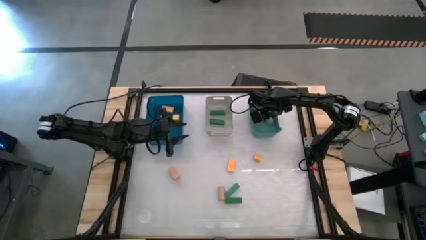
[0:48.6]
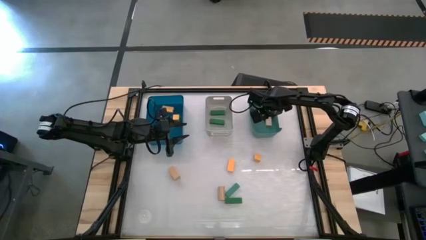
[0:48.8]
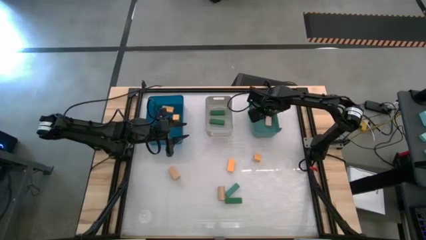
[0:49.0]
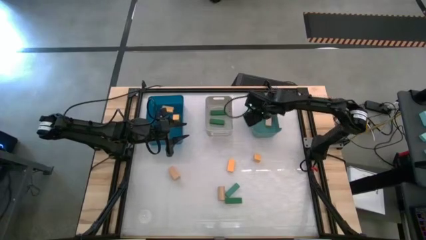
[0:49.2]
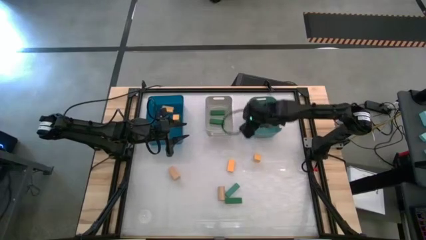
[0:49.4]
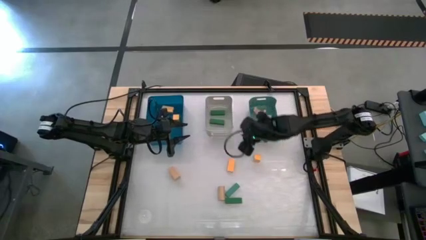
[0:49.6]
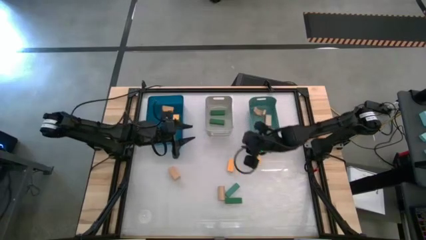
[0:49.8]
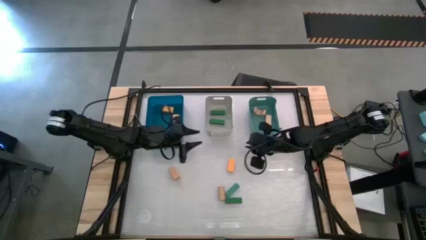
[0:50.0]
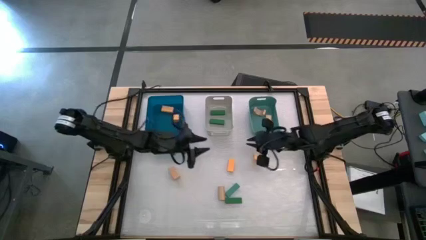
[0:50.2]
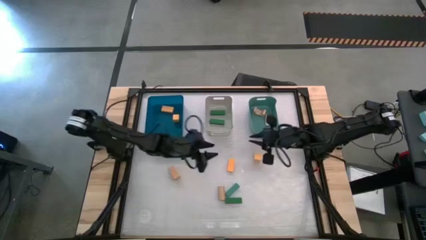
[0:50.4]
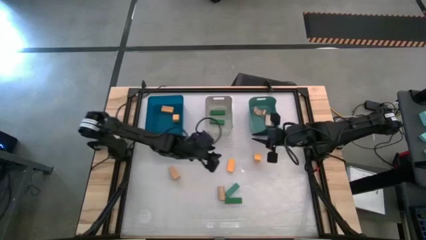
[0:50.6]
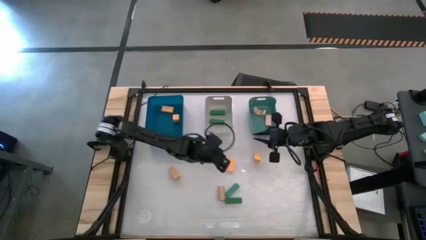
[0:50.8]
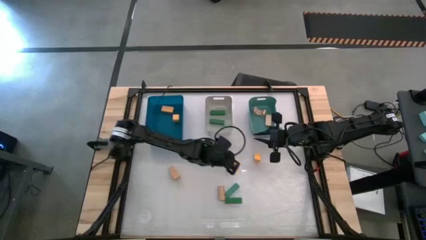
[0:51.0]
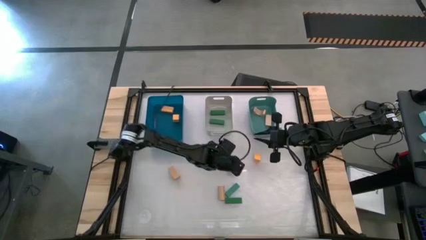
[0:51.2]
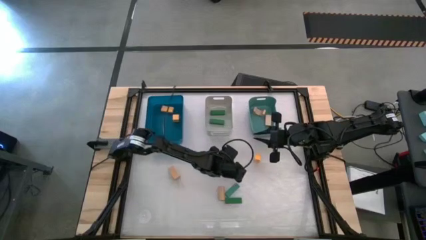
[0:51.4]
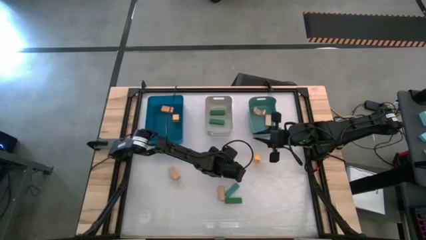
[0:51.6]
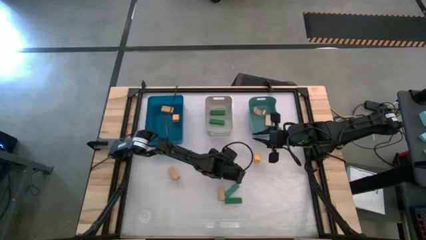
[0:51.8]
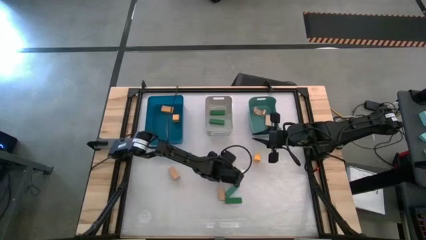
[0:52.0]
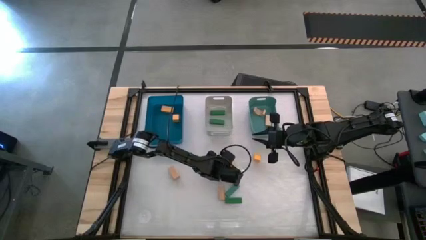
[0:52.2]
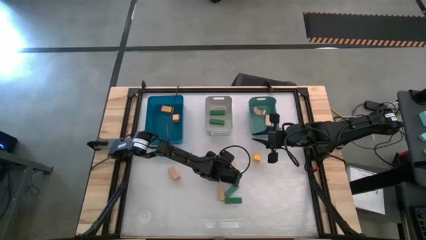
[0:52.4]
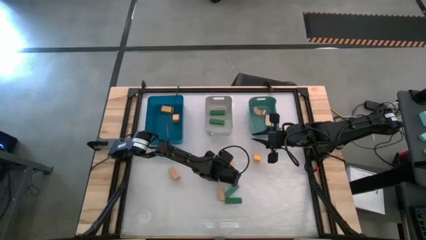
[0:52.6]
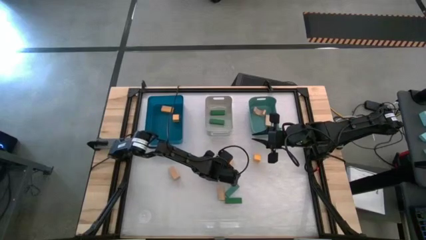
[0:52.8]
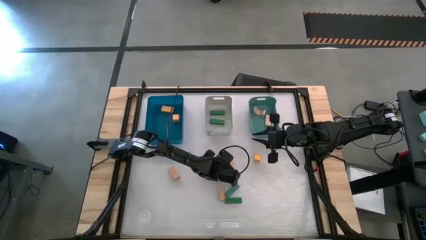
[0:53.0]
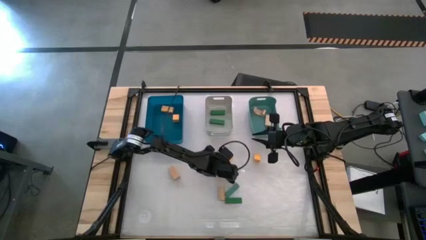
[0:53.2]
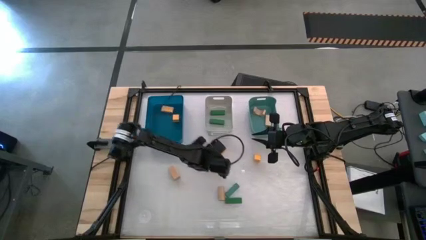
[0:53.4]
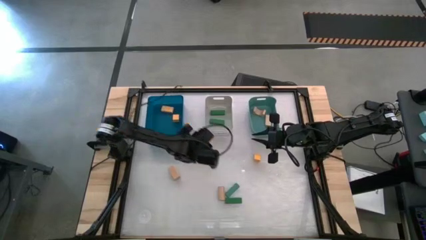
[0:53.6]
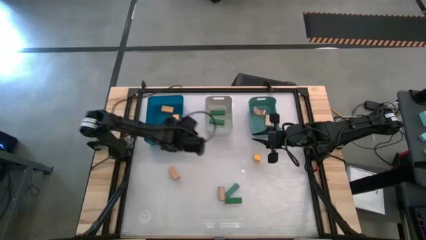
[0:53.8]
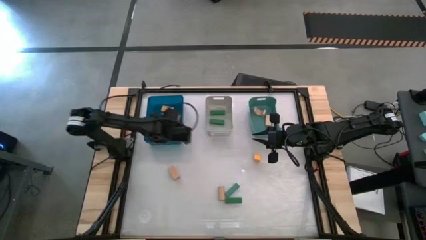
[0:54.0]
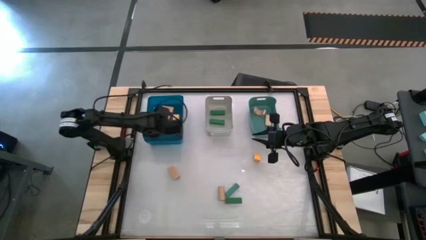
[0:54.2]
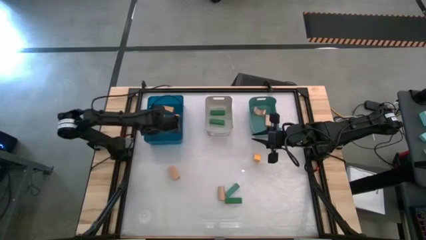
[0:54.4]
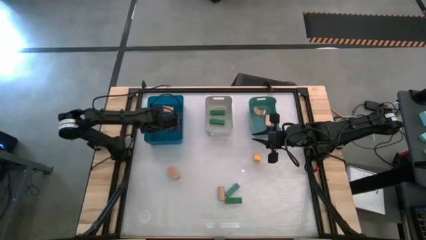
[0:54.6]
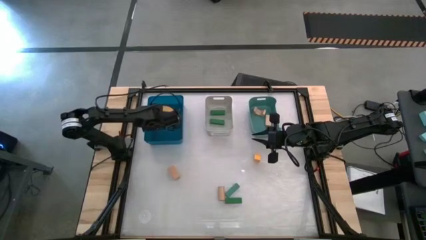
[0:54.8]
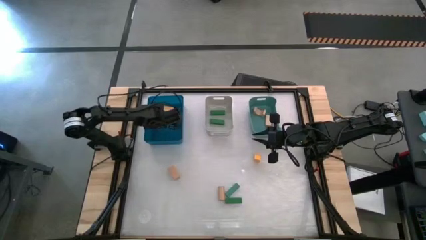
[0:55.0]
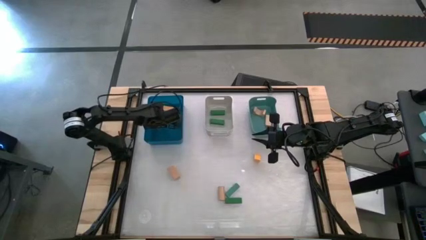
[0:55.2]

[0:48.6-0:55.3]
Task: Sort & place blocks by color
Put the yellow block into the blue bin

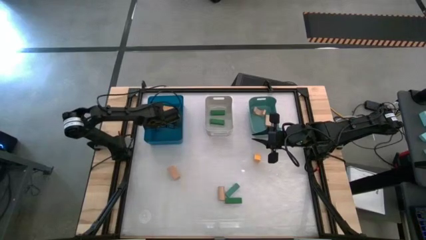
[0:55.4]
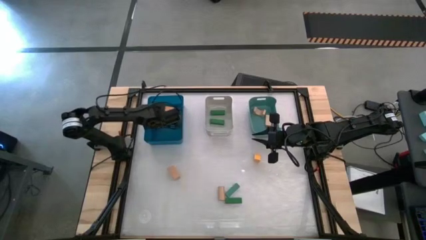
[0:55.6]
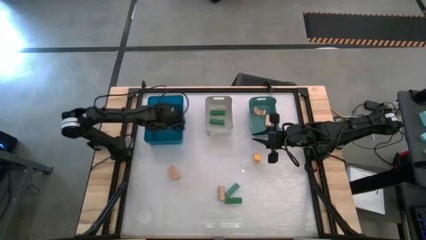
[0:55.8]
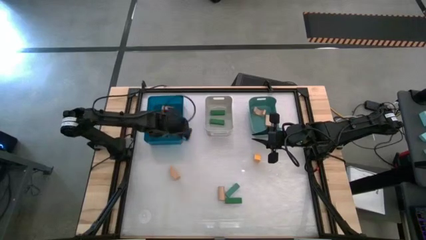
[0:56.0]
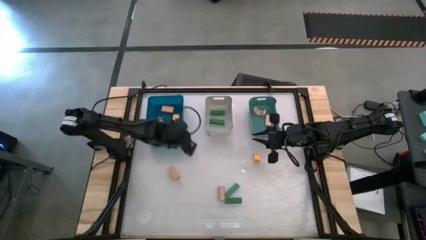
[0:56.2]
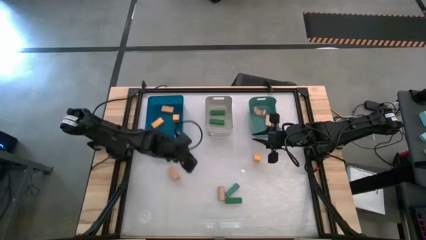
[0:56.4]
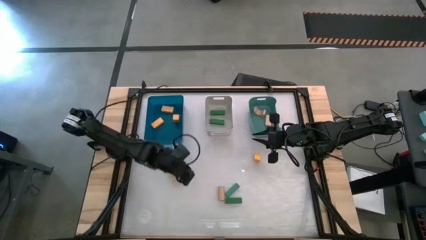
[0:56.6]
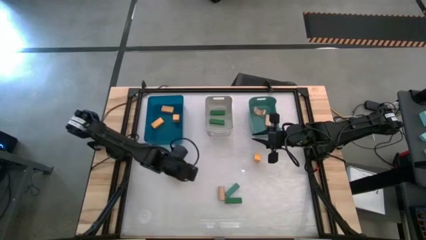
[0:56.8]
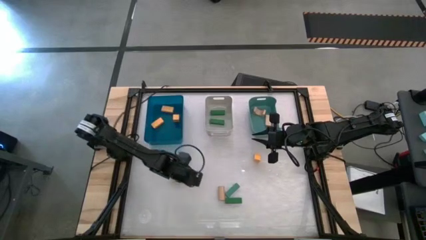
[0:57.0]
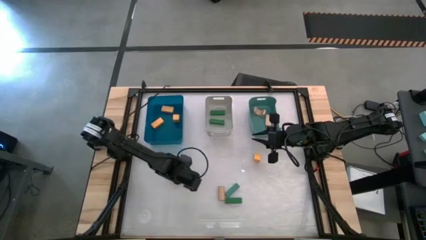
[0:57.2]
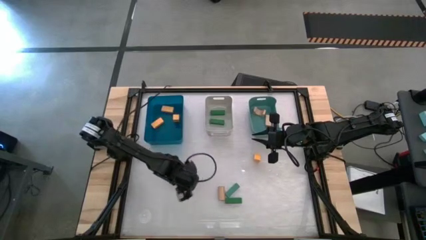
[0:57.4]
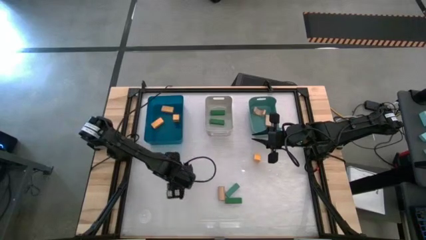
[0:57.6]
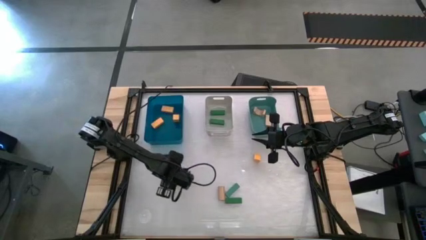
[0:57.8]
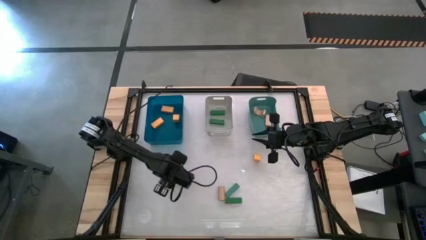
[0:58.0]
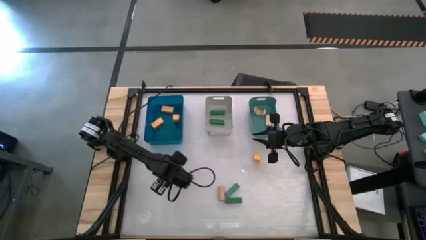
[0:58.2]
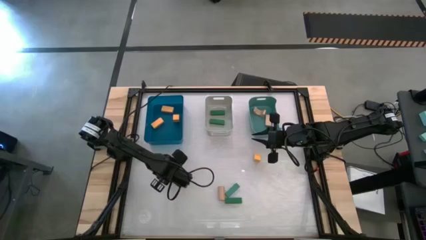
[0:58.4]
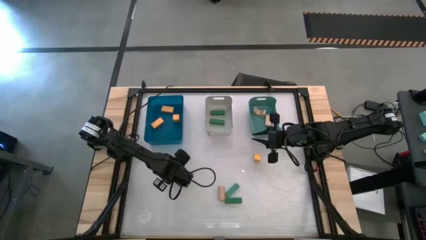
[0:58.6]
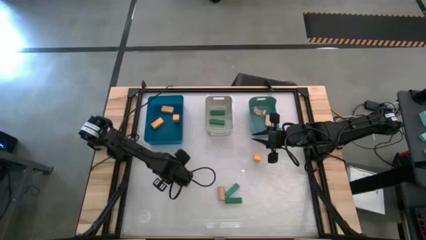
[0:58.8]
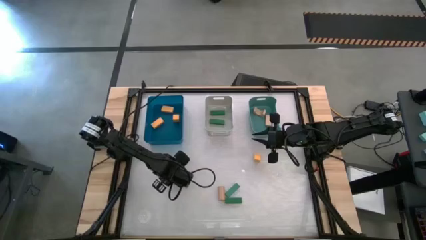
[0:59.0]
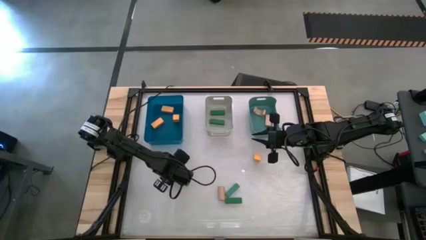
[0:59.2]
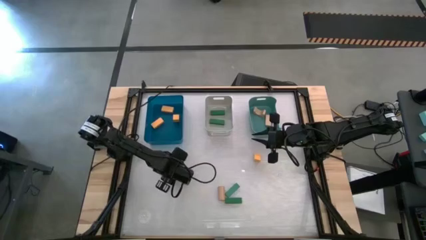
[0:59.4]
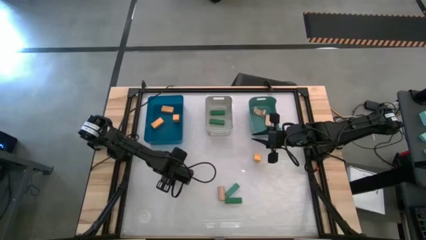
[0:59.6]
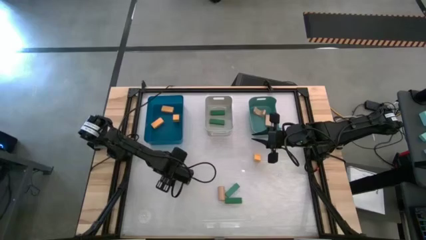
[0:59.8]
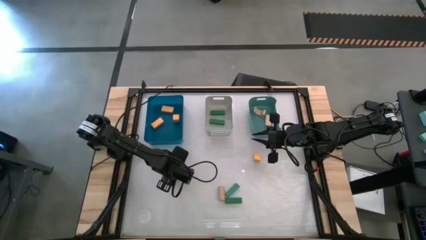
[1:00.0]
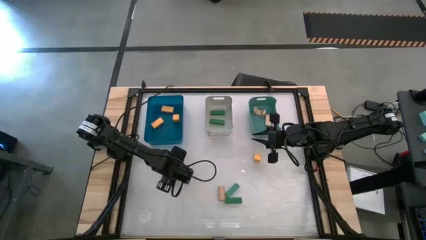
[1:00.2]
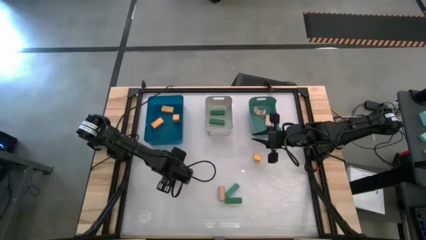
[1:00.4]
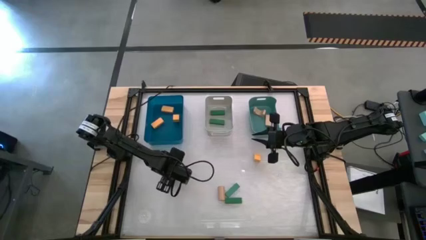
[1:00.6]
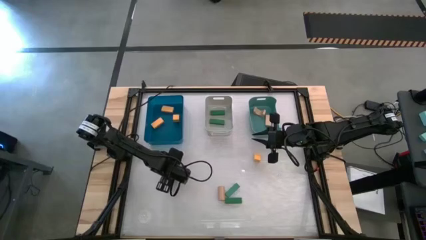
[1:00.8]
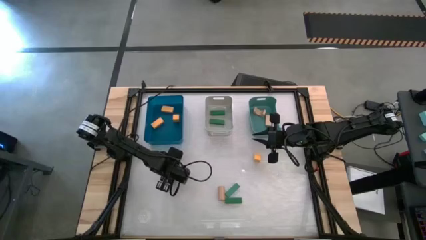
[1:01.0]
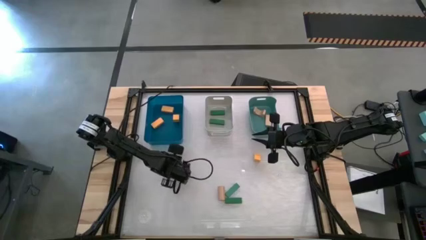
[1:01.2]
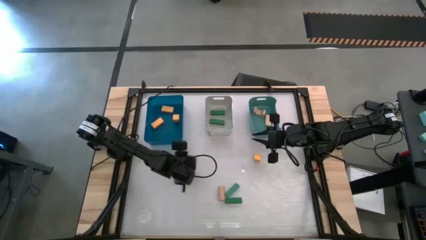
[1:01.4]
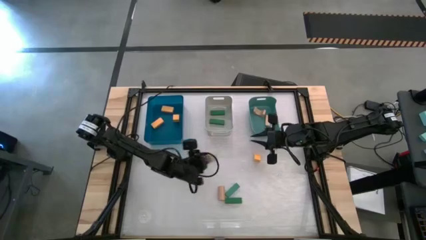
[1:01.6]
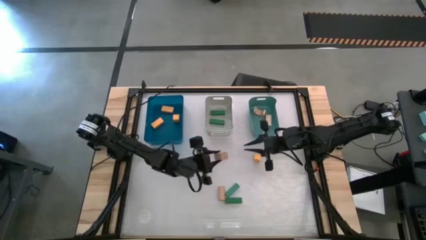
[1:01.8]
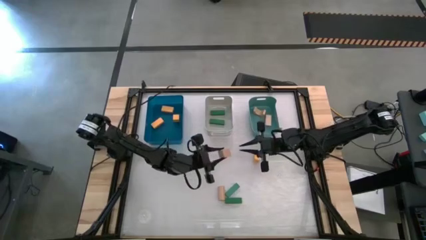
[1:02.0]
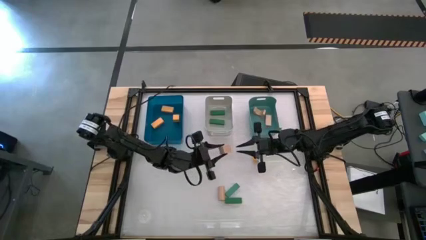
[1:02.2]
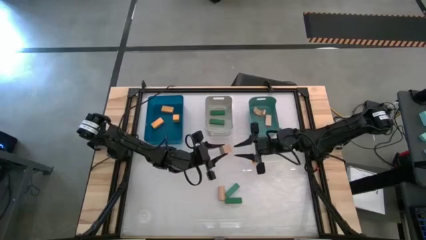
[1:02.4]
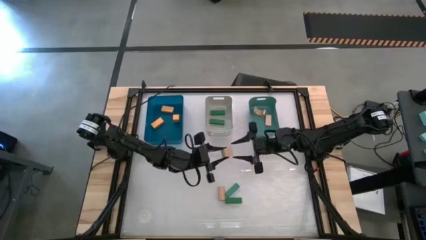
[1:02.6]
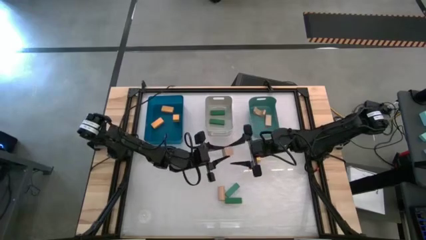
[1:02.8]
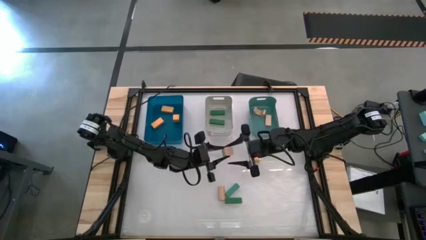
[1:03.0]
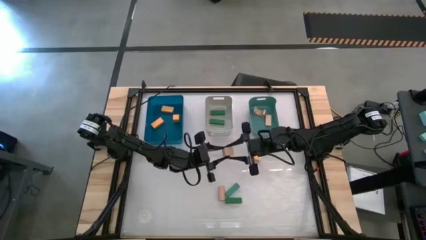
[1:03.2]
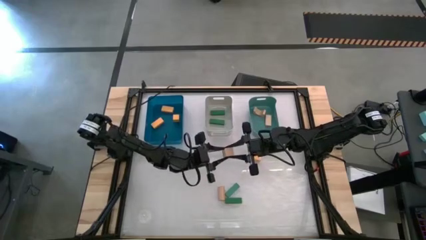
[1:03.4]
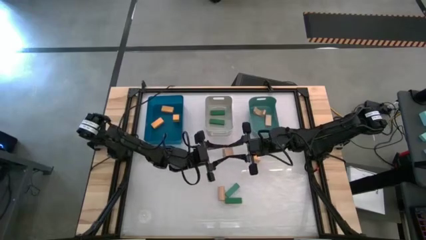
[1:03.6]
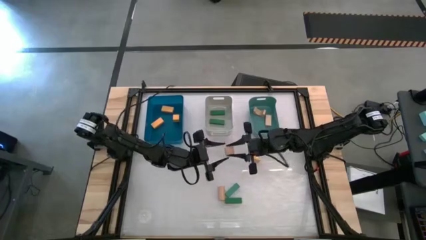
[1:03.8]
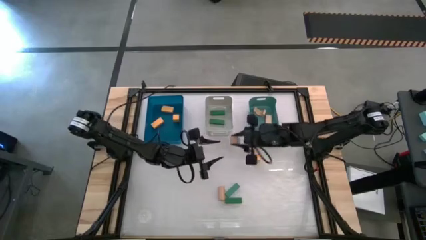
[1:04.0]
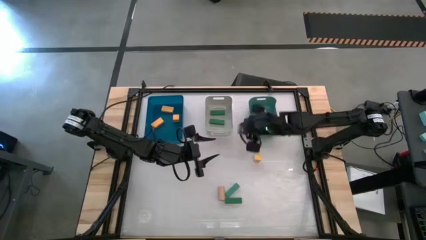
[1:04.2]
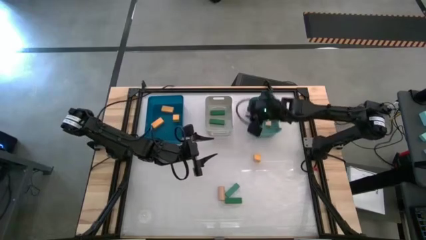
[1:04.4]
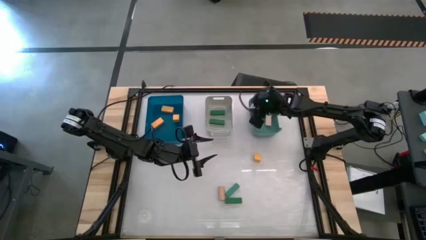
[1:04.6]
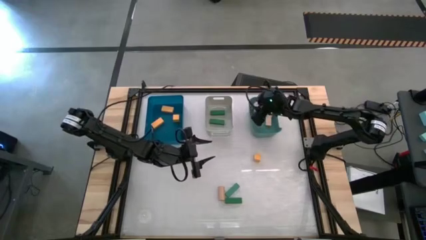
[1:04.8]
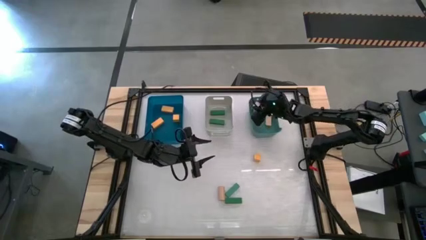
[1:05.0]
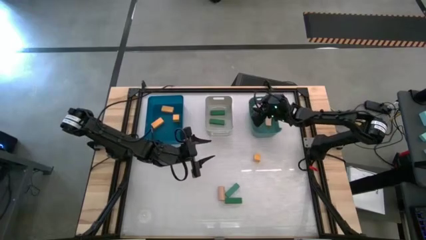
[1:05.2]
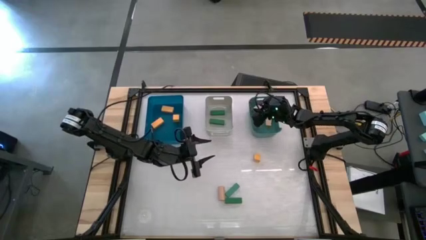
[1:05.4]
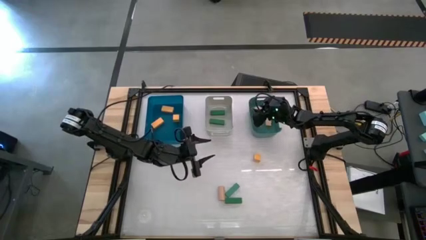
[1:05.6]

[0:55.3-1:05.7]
Put the brown block into the green bin

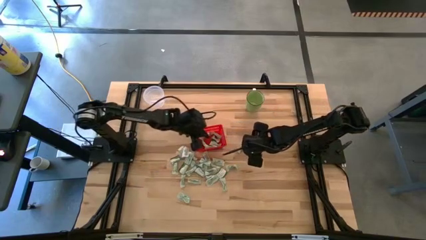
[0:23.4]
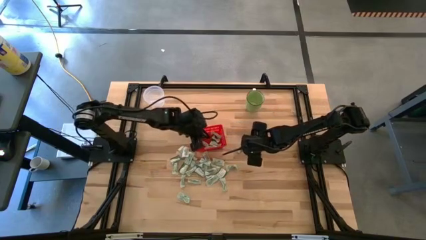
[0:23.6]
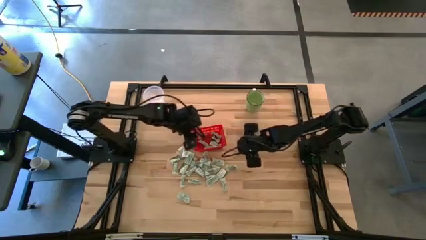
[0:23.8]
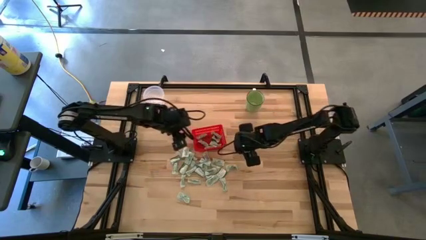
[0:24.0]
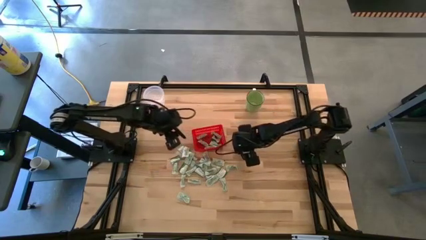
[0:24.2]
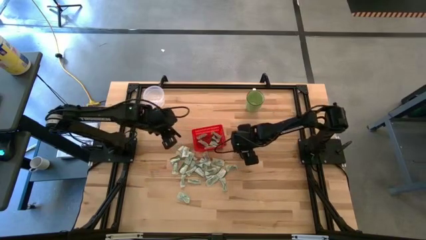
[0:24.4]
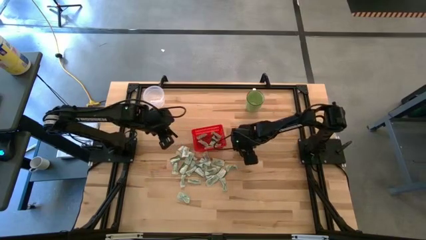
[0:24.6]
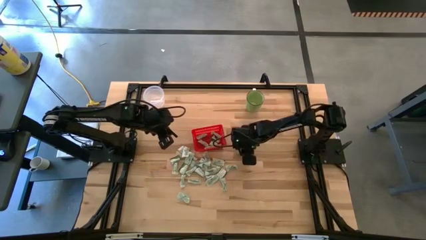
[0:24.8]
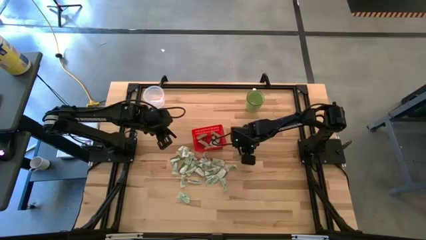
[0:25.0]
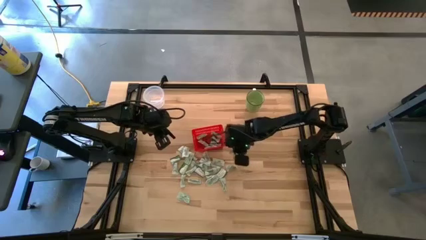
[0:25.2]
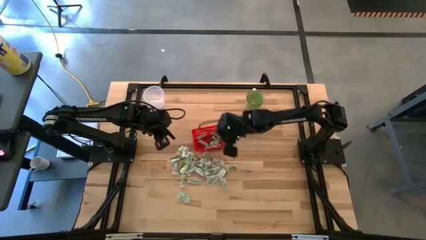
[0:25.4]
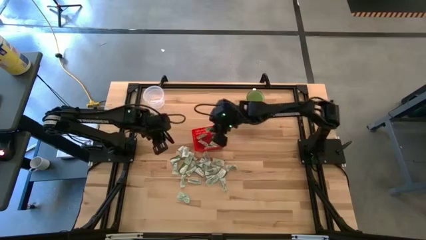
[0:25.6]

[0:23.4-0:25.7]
Task: Pick and place Stevia / Truvia into bins
Put the stevia packet into the red basket
